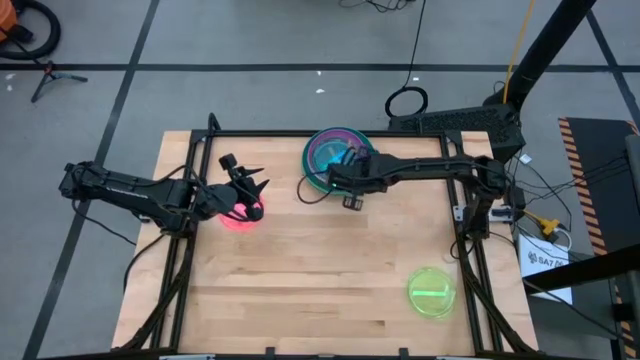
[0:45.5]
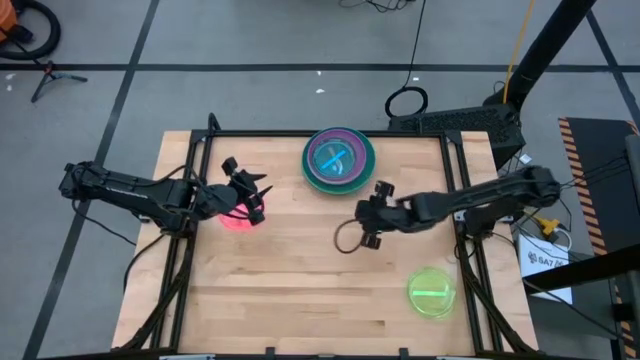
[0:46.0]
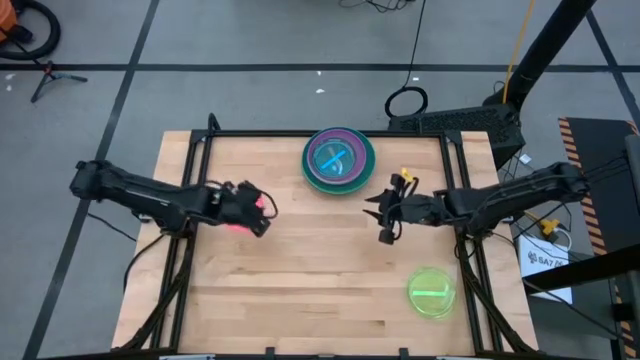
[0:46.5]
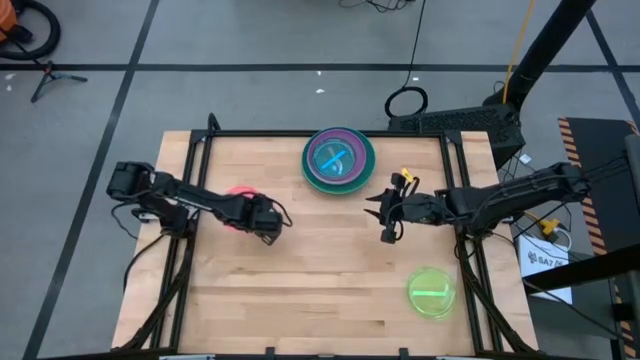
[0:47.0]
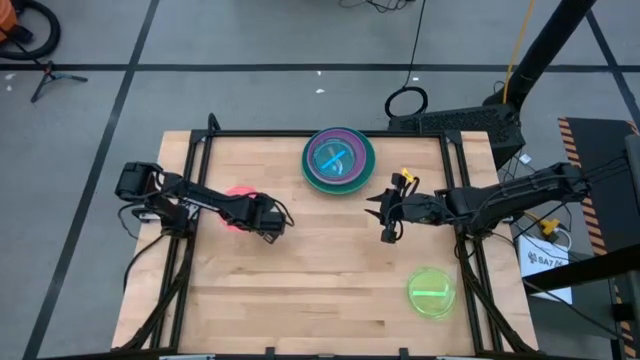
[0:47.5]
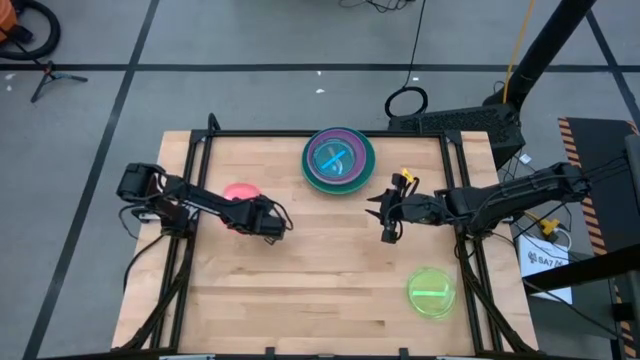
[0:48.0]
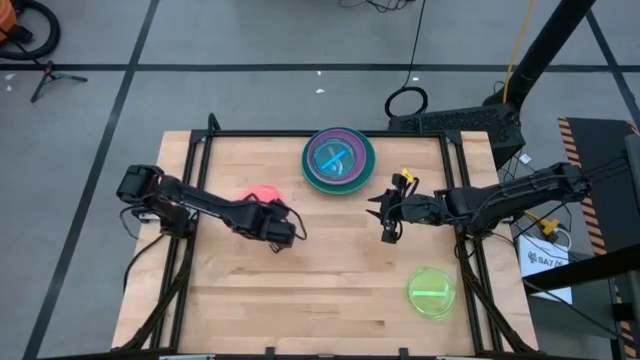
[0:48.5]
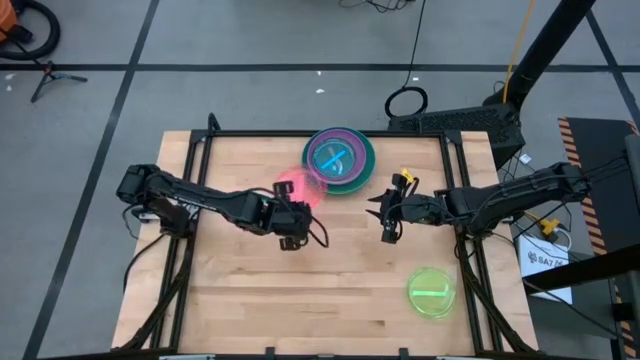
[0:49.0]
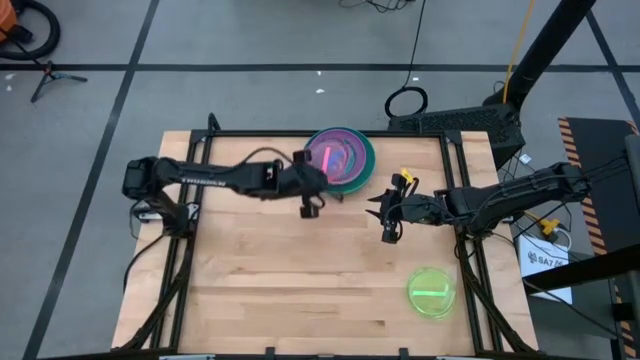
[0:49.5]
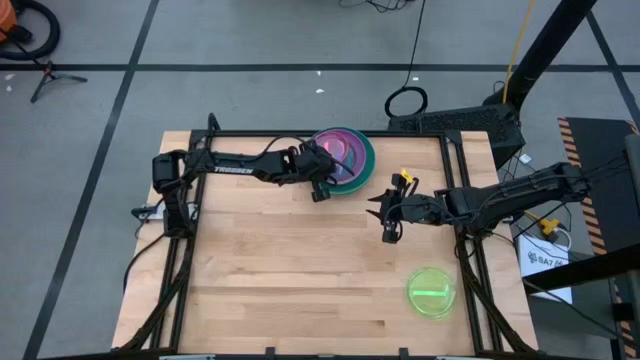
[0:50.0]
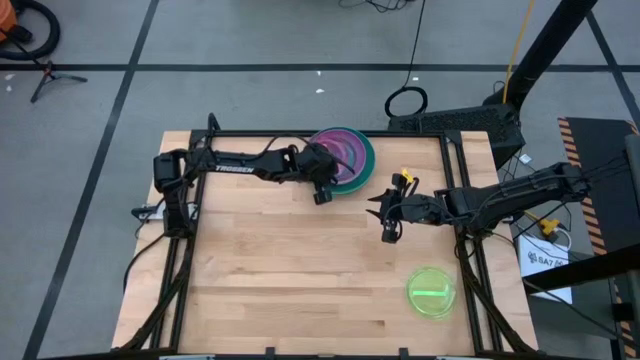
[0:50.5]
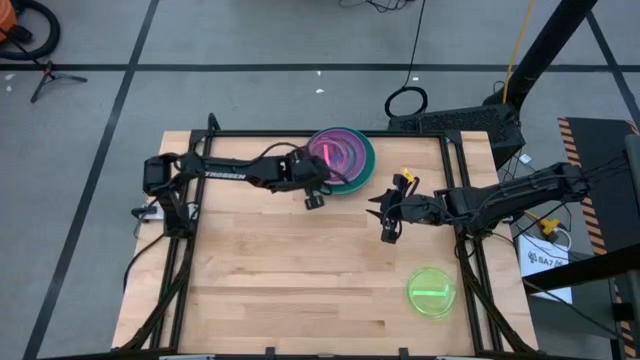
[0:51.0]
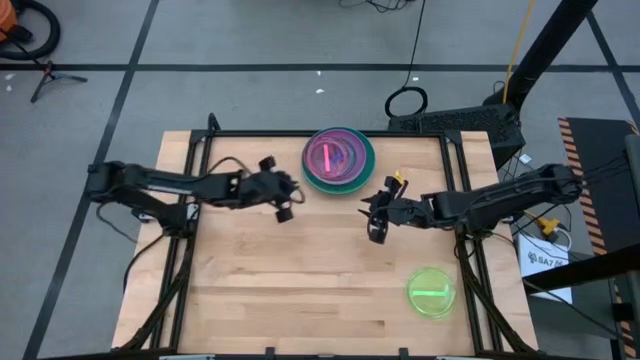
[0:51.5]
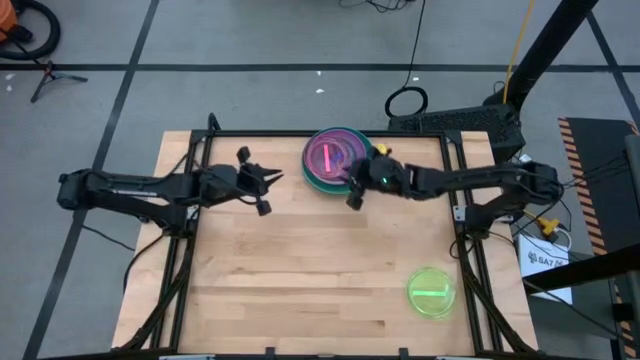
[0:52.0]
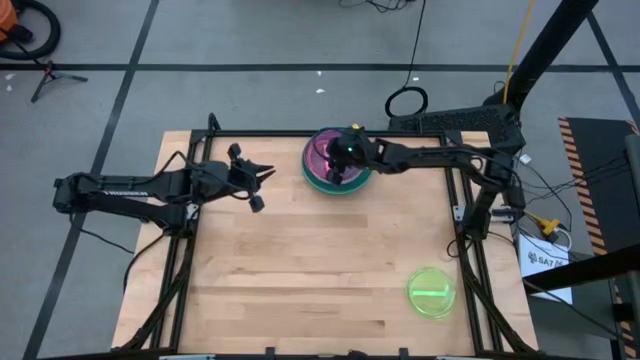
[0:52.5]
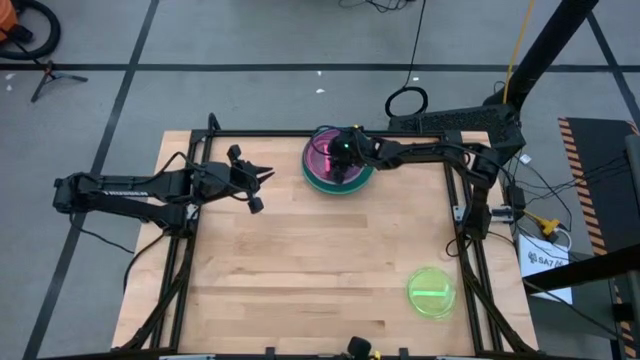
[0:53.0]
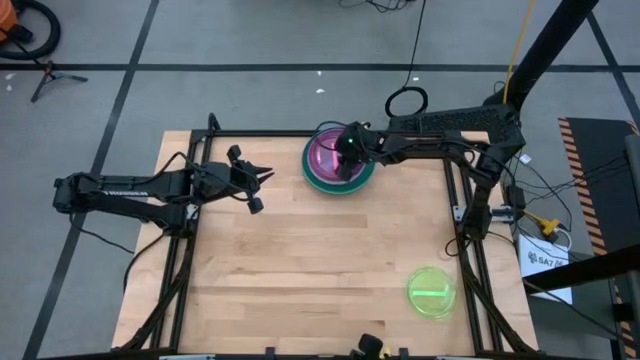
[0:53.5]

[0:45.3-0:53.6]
Task: Stack plastic plates
Stack the pink plate on the blue plate

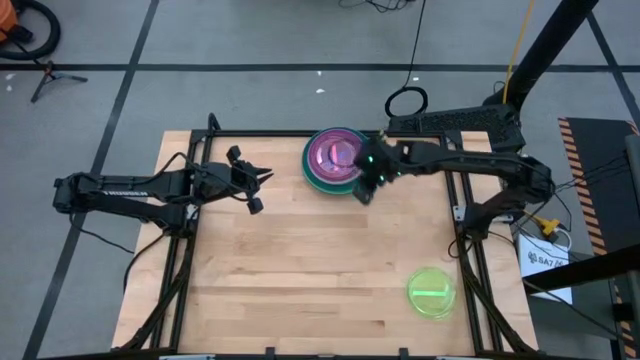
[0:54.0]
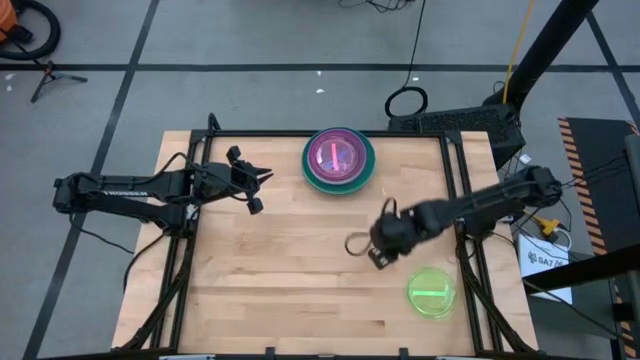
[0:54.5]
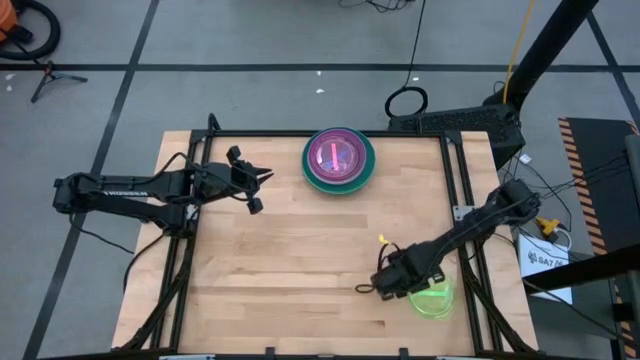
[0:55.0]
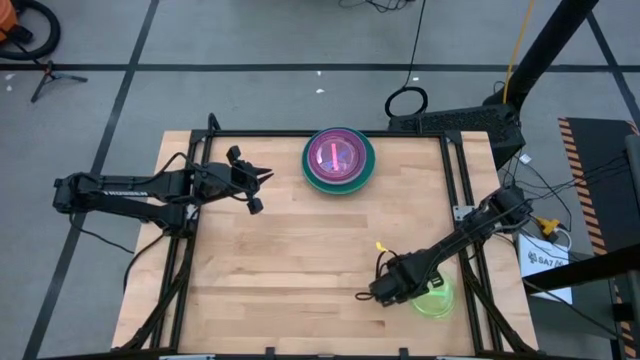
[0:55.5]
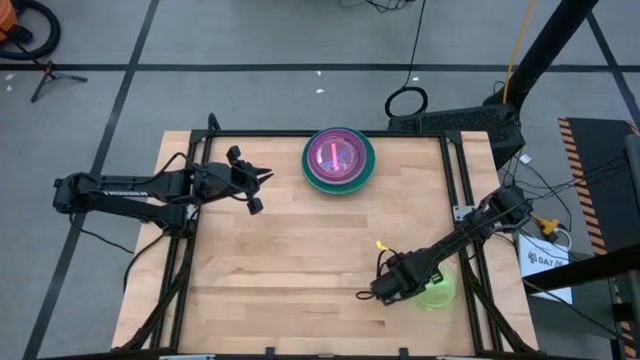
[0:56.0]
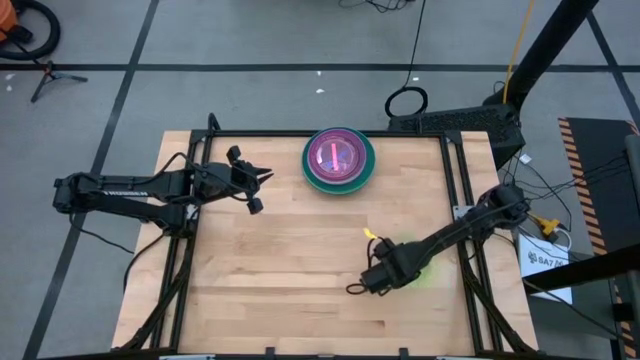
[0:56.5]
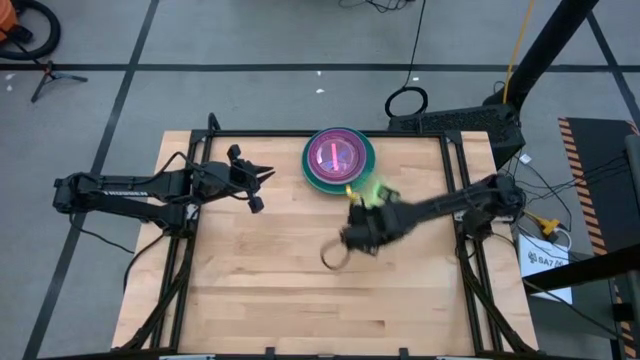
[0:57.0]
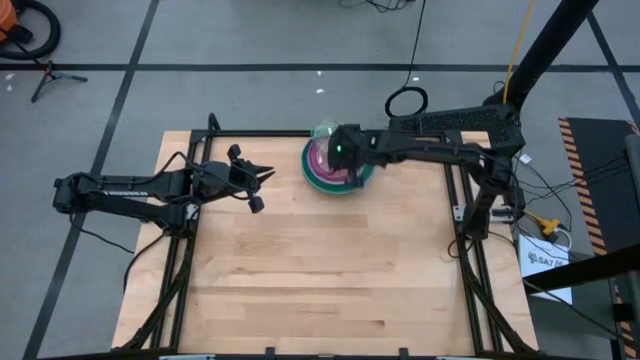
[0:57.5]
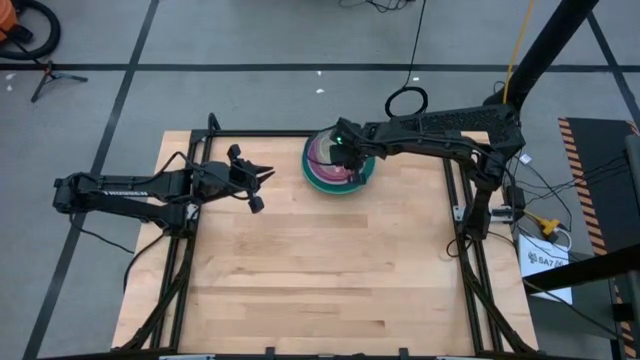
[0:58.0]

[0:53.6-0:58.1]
Stack the light green plate on the pink plate

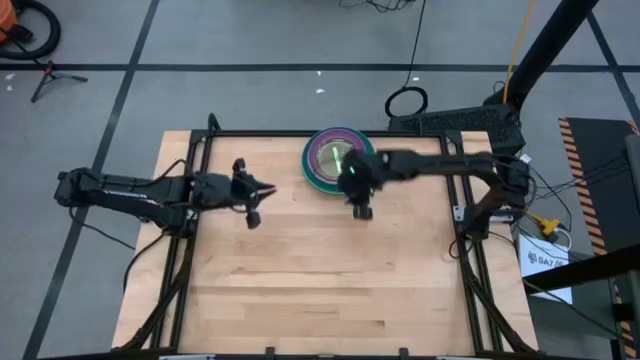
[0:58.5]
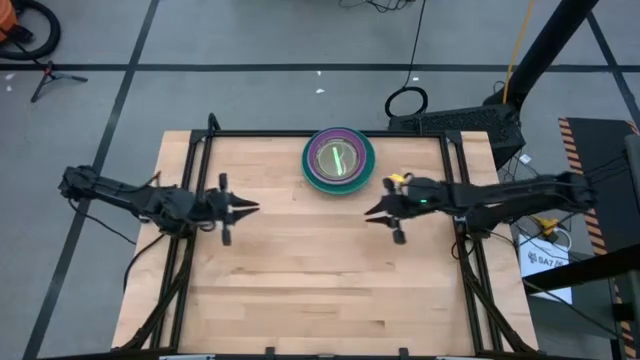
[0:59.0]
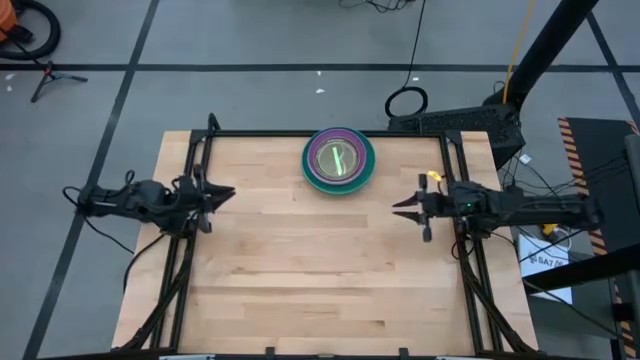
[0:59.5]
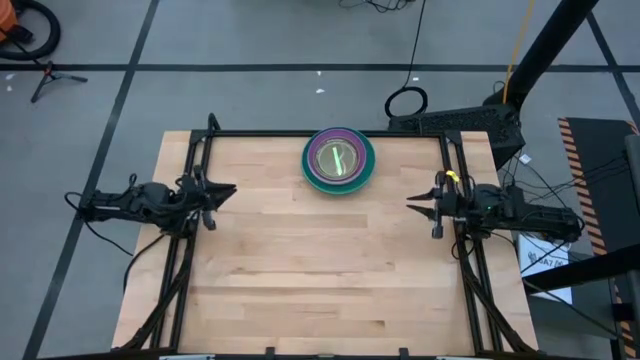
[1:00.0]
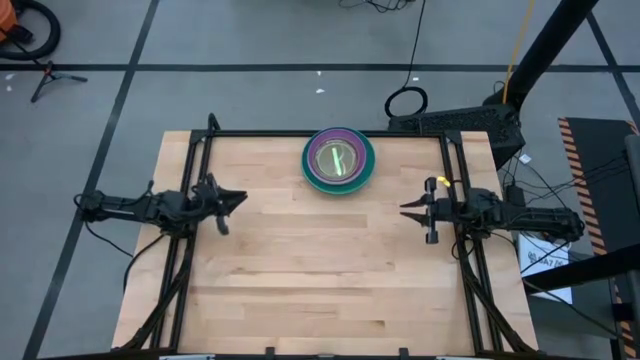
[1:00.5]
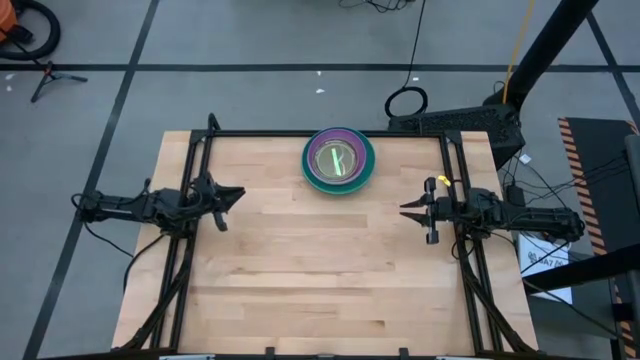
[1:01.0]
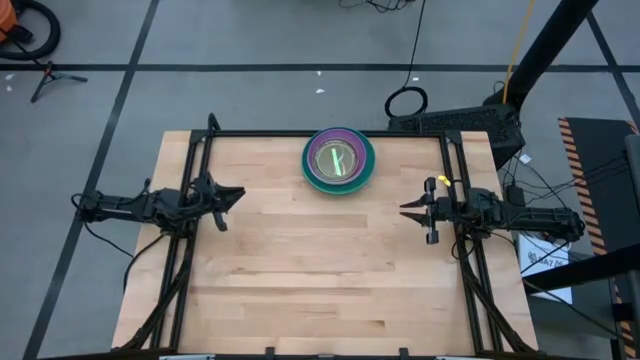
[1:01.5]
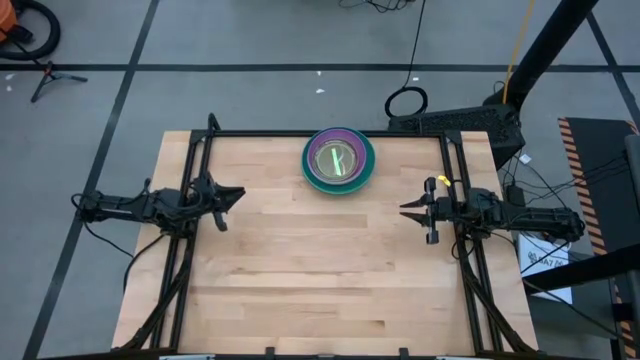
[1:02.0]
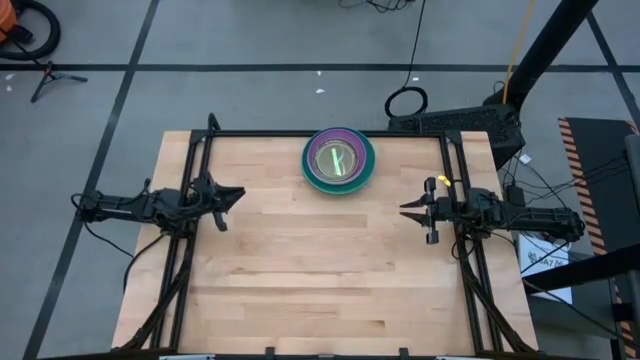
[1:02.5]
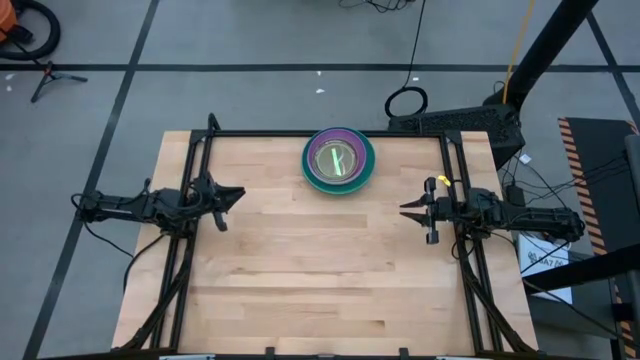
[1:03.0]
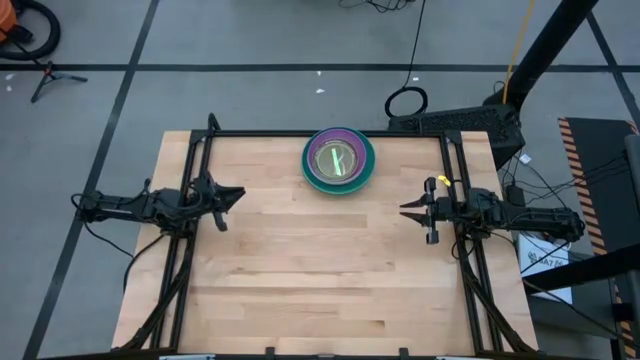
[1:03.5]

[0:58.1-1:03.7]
Return to Home Position

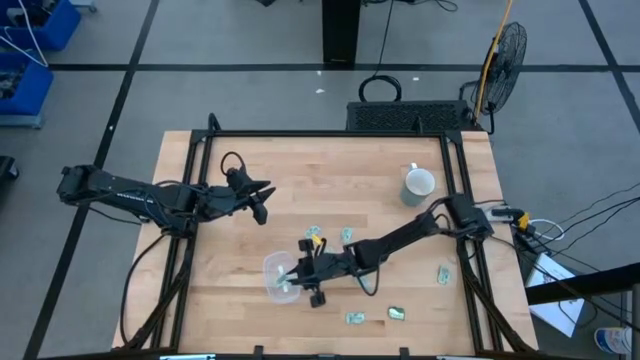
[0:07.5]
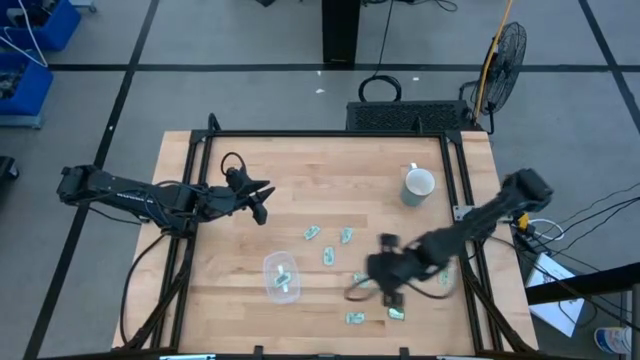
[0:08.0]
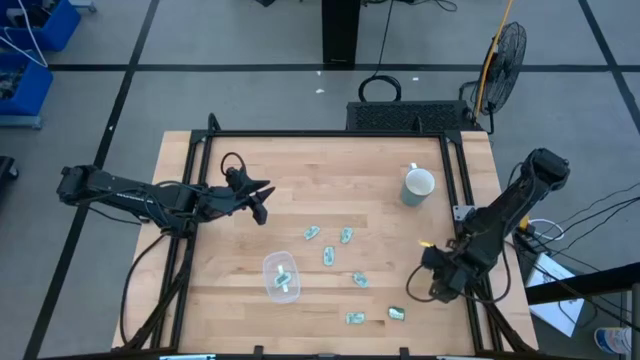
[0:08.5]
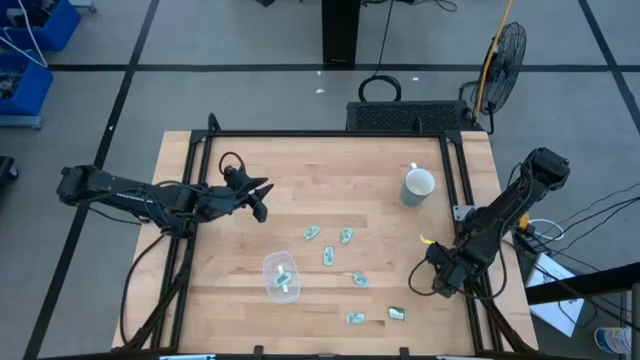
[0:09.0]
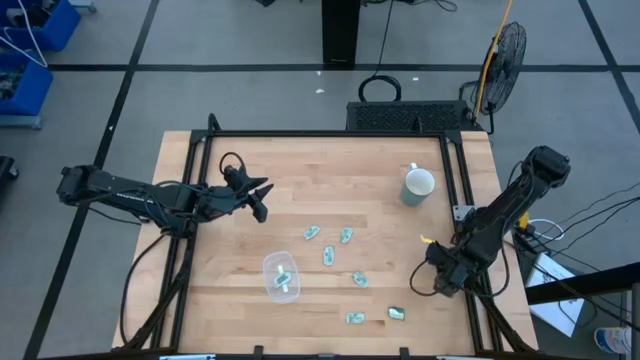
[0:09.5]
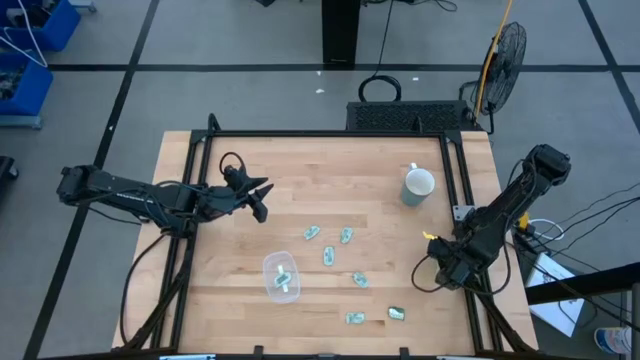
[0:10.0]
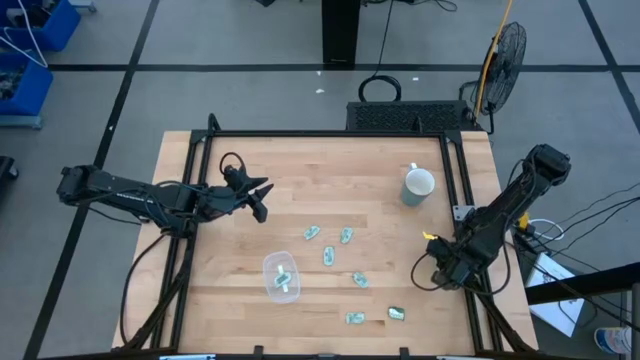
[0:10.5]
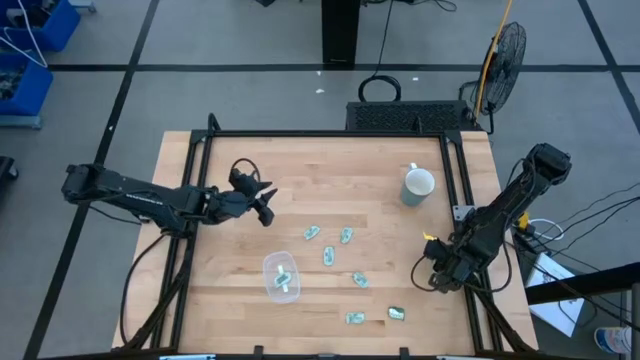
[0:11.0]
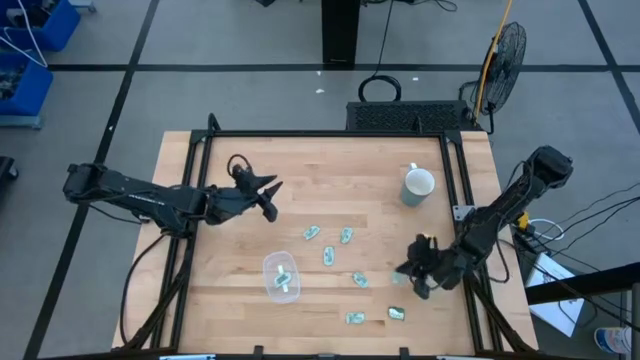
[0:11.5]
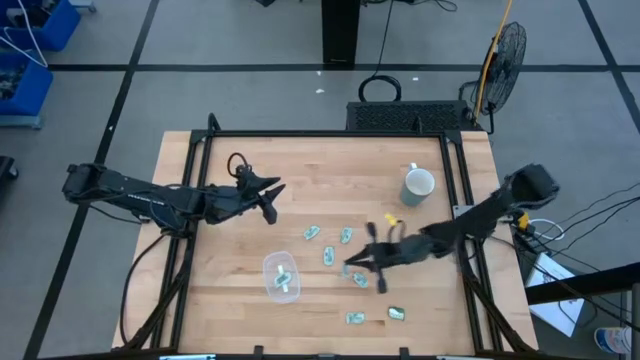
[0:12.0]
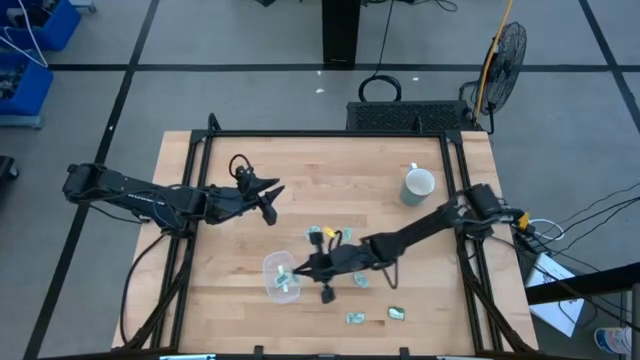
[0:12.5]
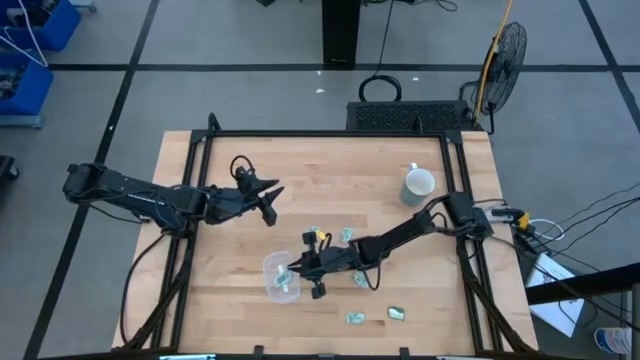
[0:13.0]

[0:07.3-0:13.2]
Task: Pick and place Stevia / Truvia into bins
Put the stevia packet into the transparent container
